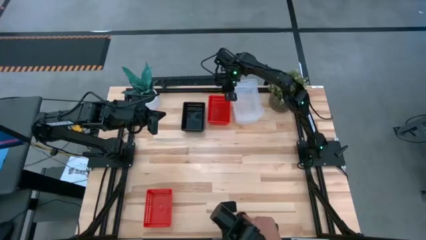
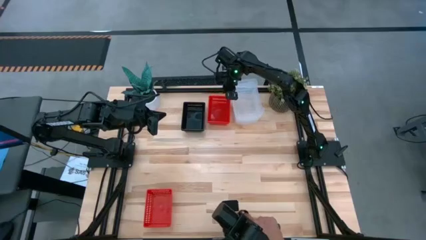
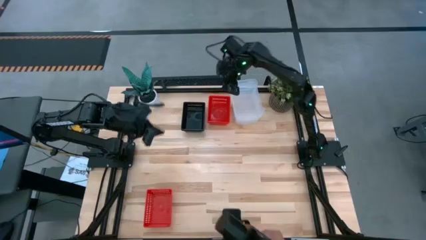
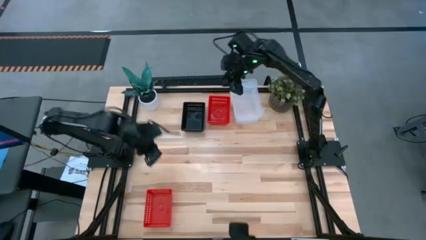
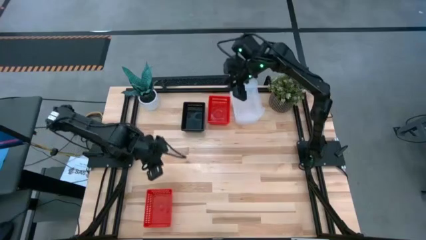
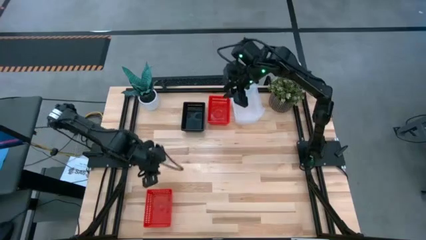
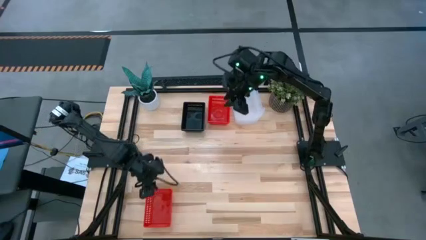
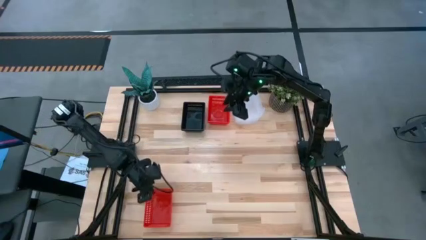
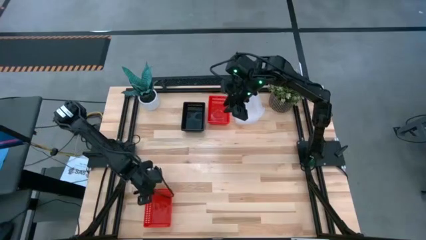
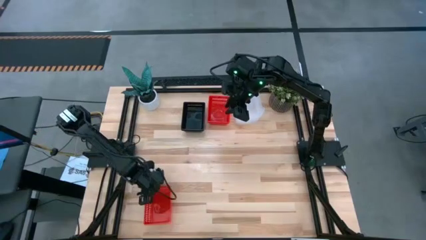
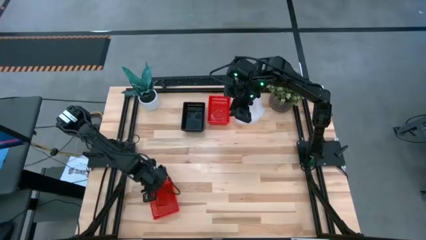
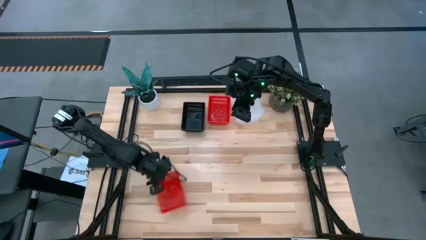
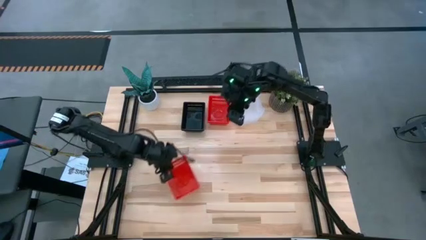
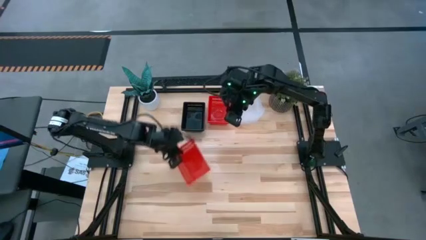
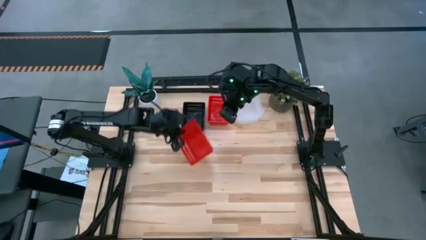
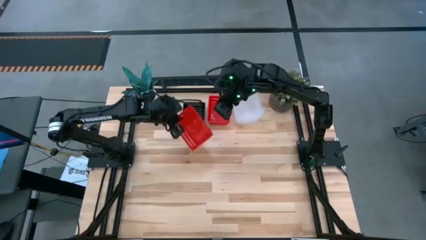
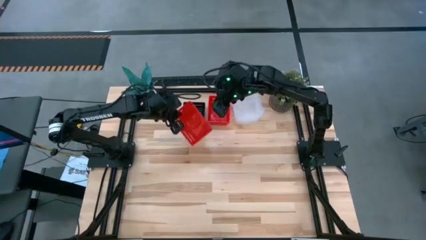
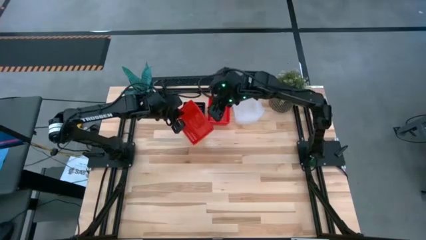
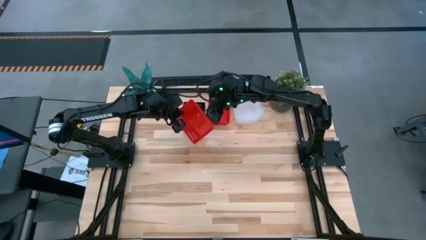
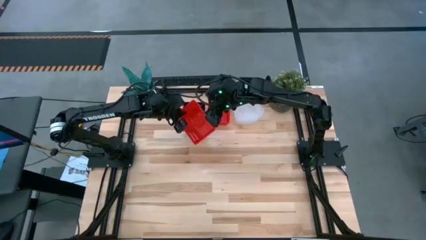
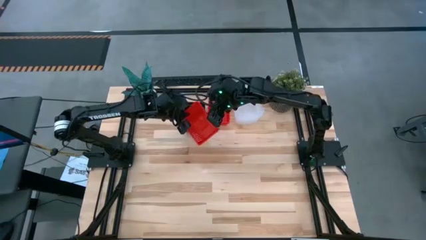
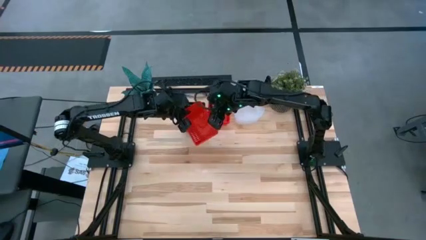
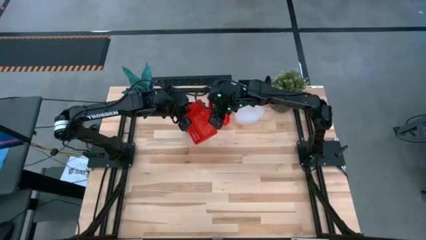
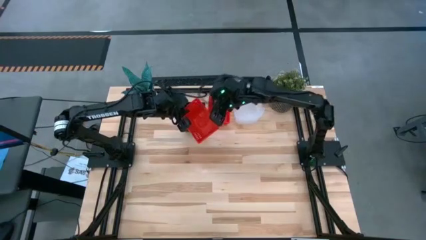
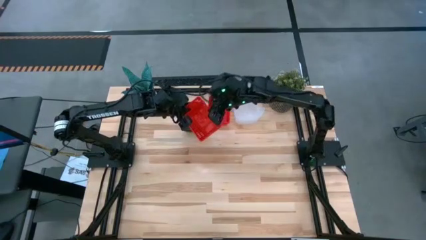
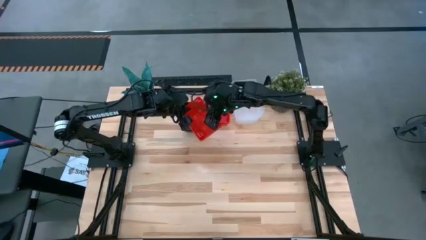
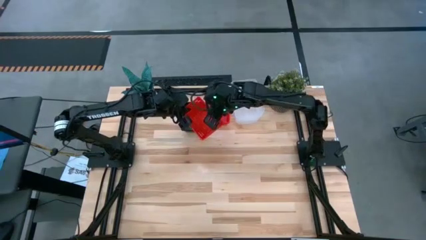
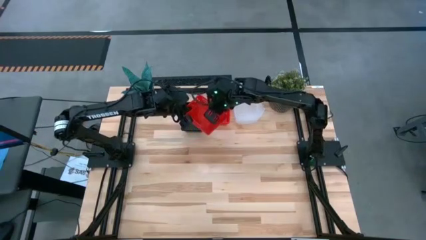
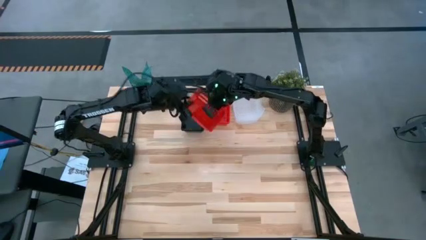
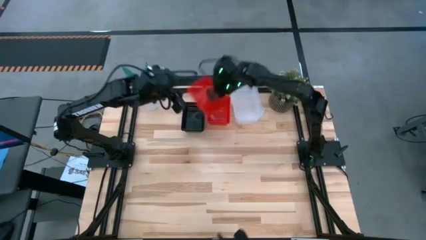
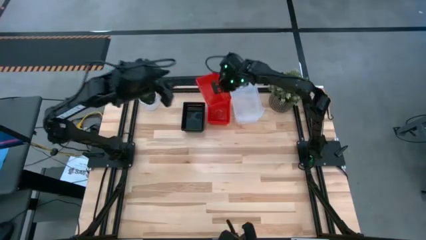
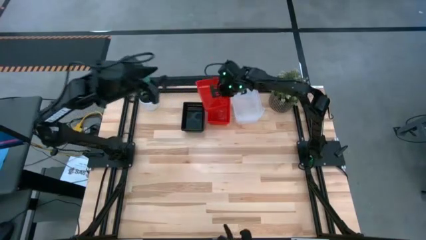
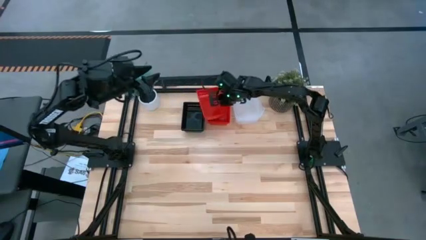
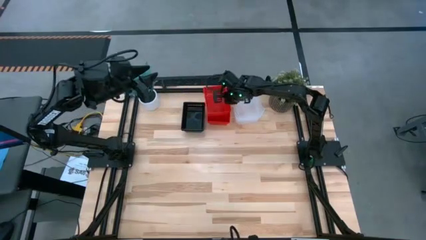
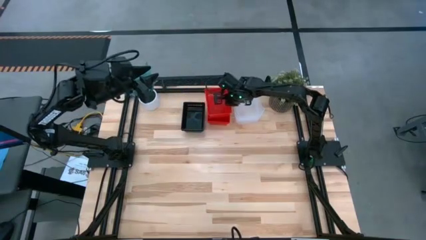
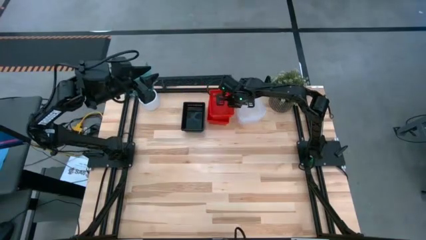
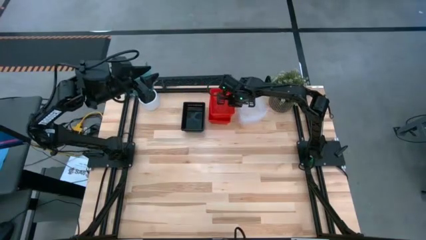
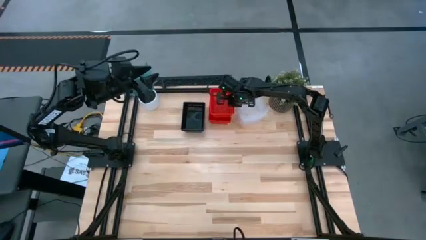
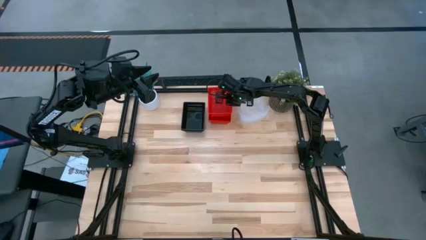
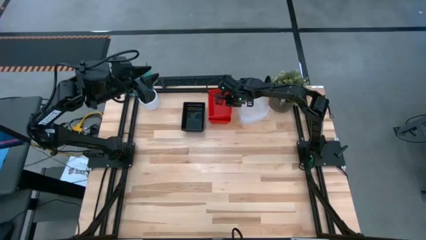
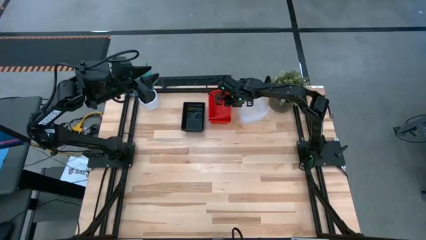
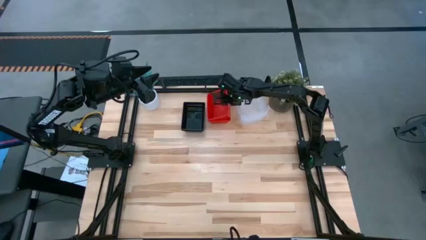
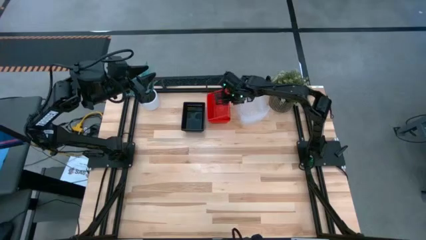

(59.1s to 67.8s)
Stack the bottom orange bin on the orange bin

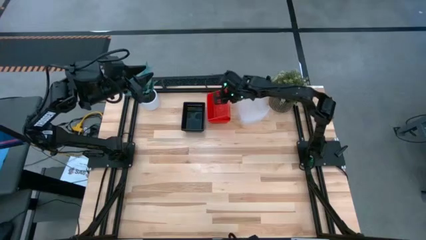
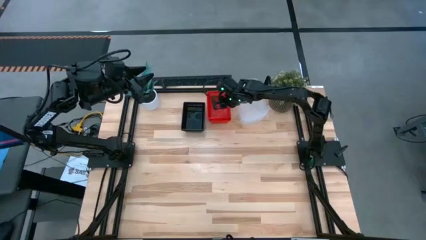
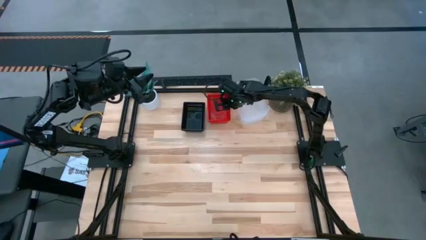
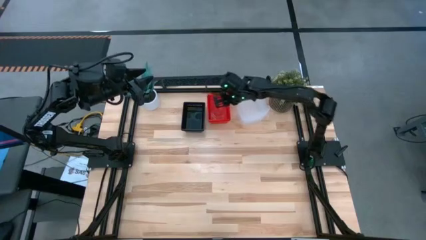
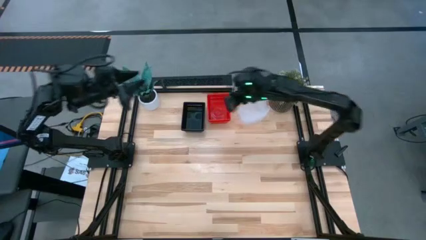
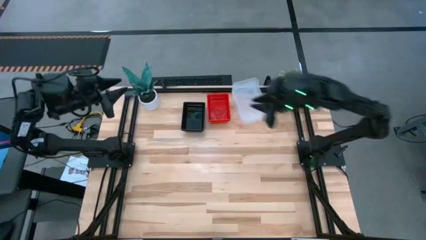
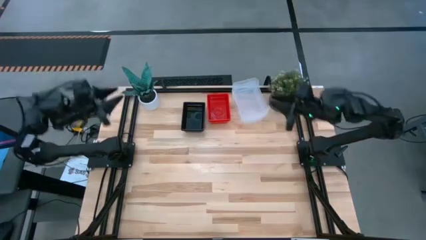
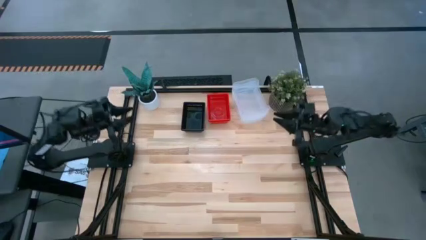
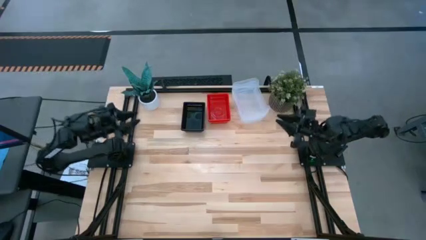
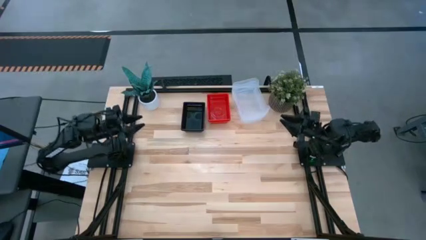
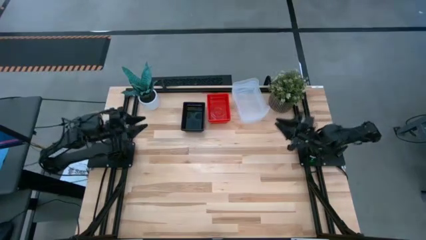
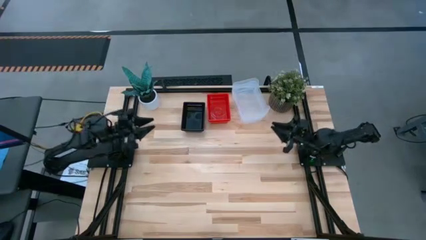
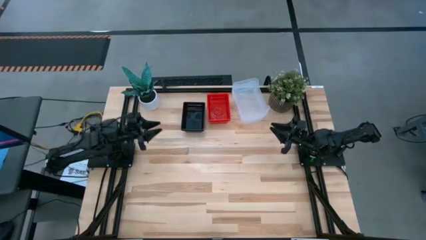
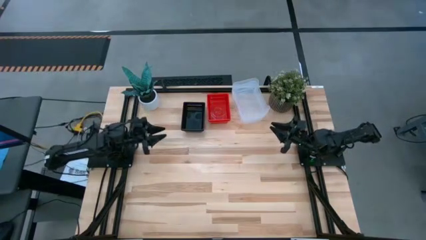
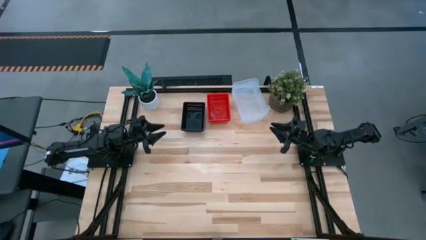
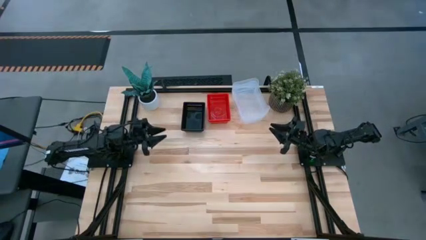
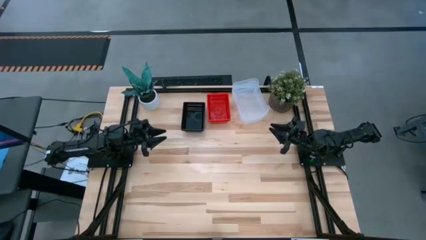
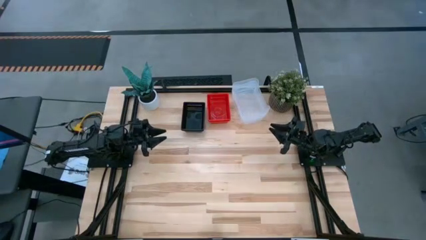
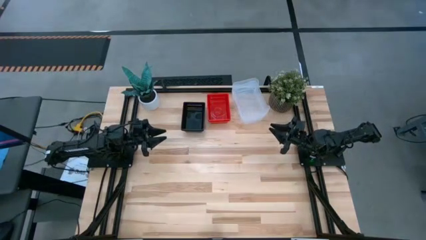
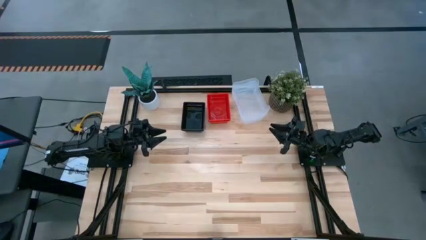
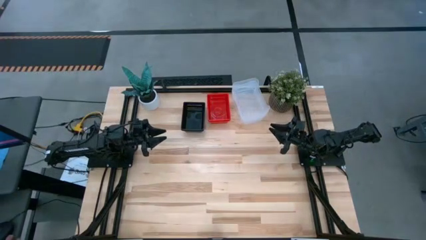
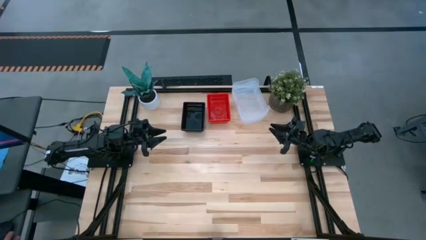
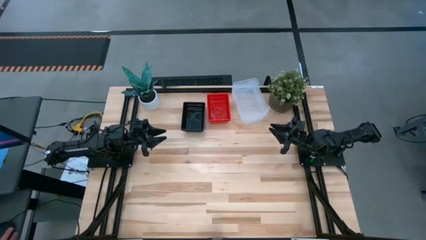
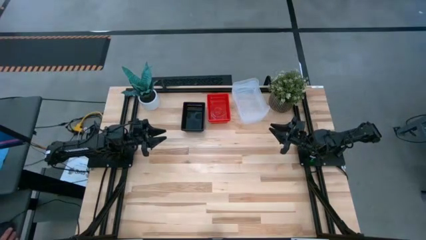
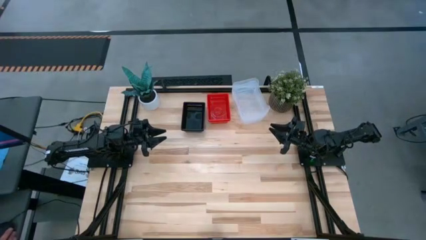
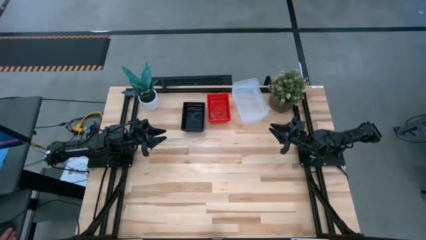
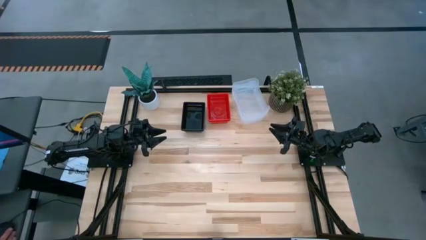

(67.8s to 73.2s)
Return to Home Position
